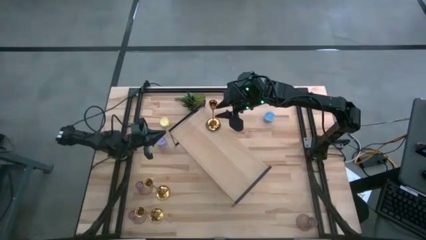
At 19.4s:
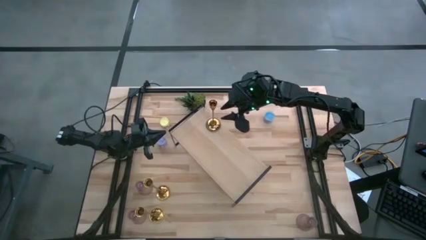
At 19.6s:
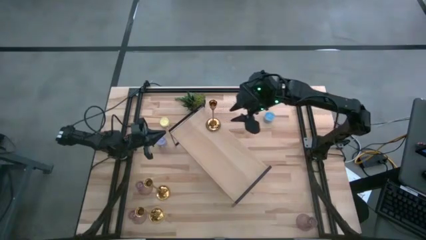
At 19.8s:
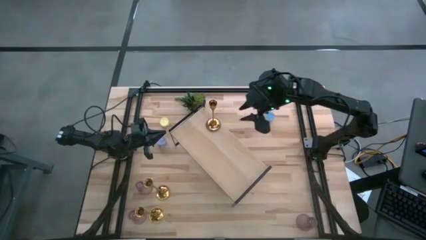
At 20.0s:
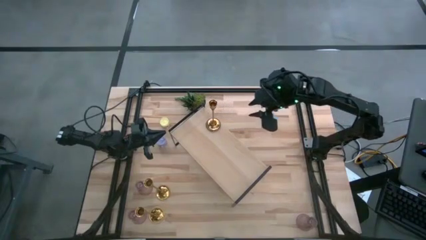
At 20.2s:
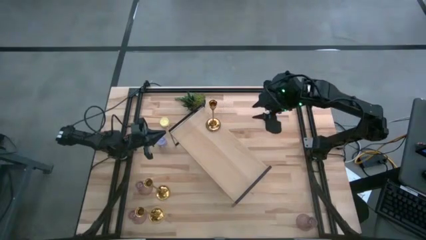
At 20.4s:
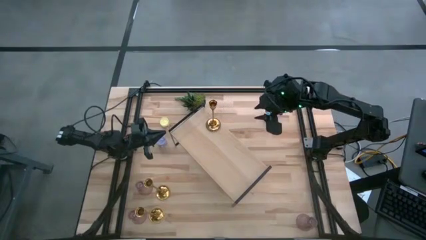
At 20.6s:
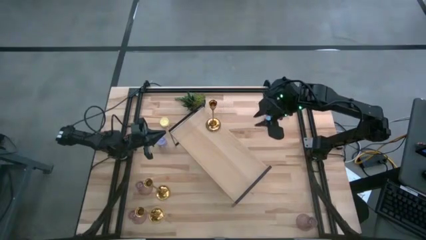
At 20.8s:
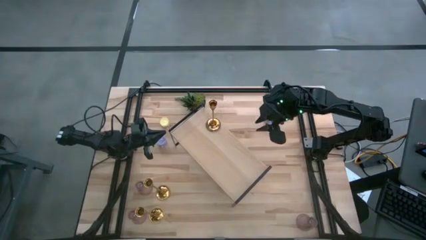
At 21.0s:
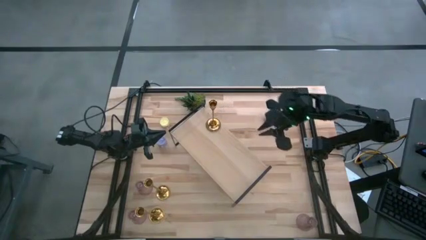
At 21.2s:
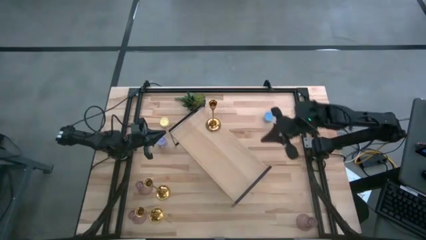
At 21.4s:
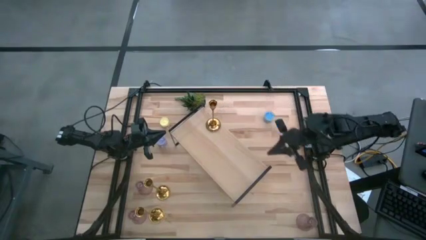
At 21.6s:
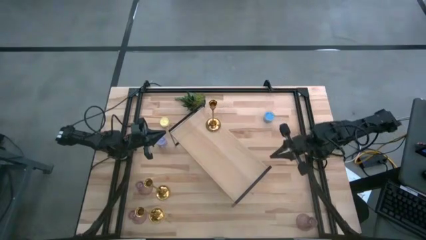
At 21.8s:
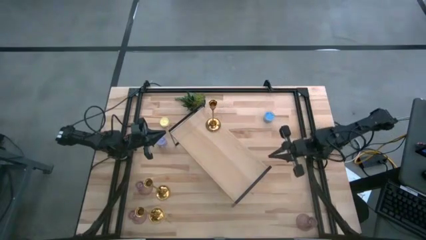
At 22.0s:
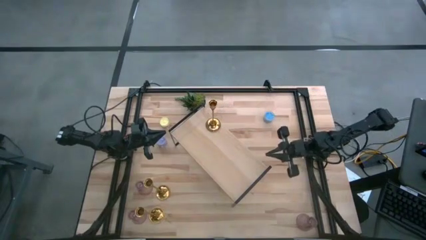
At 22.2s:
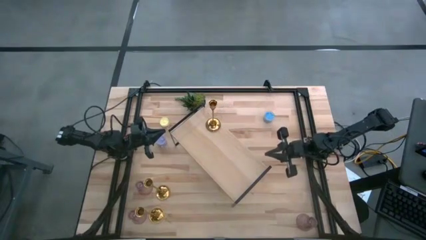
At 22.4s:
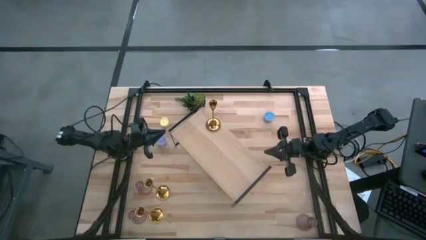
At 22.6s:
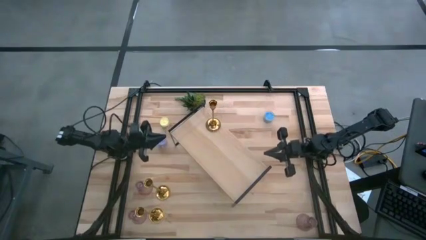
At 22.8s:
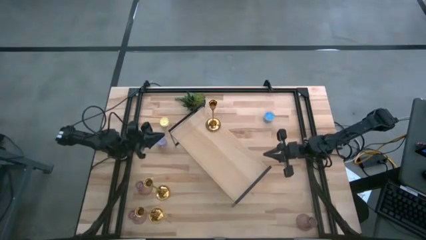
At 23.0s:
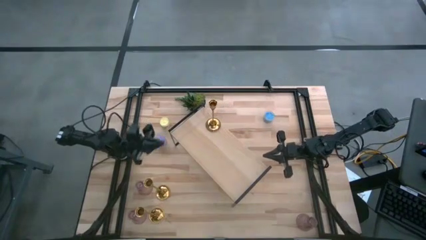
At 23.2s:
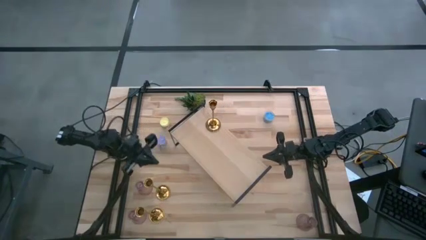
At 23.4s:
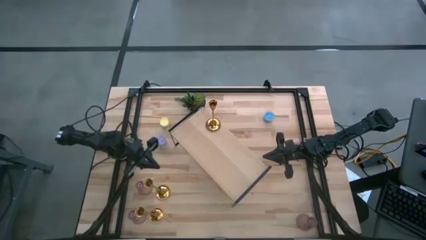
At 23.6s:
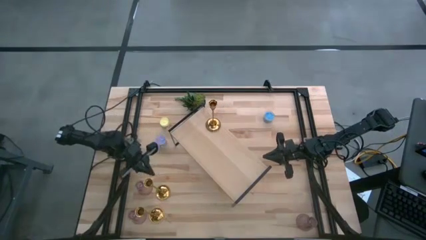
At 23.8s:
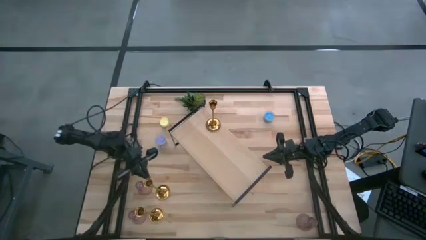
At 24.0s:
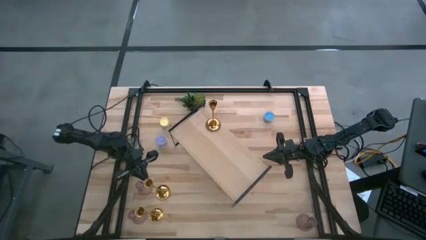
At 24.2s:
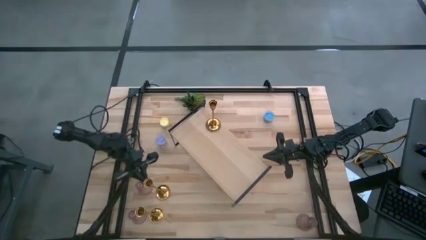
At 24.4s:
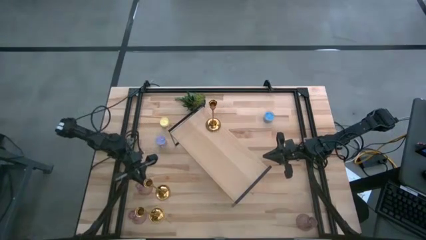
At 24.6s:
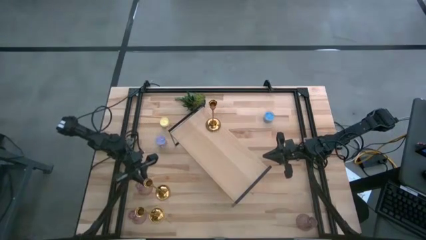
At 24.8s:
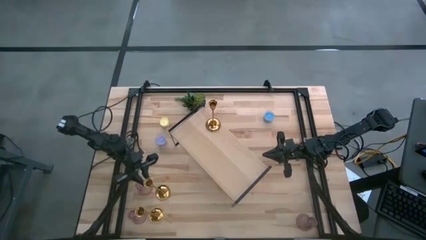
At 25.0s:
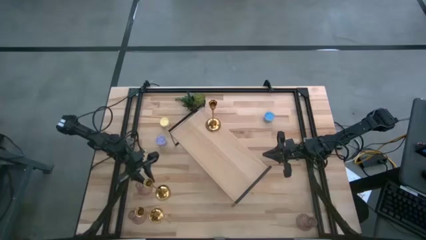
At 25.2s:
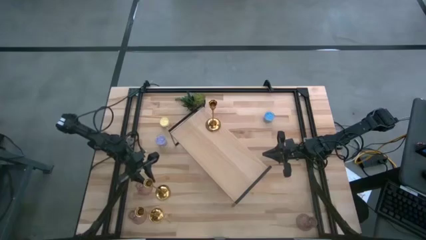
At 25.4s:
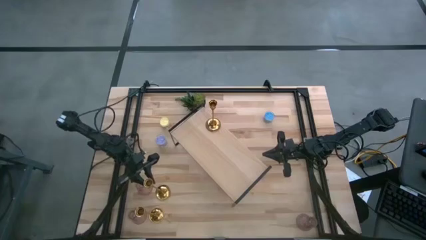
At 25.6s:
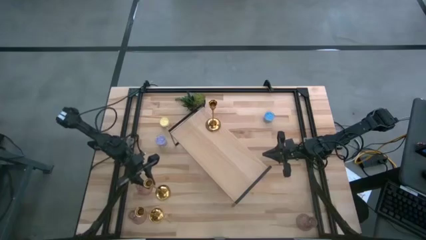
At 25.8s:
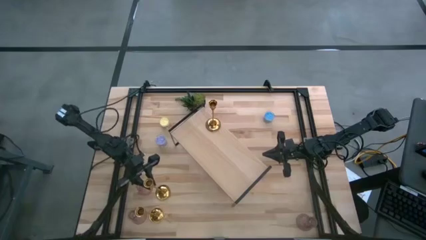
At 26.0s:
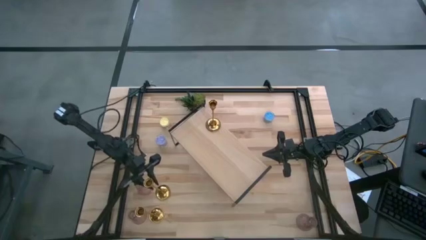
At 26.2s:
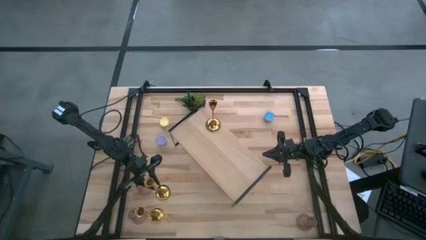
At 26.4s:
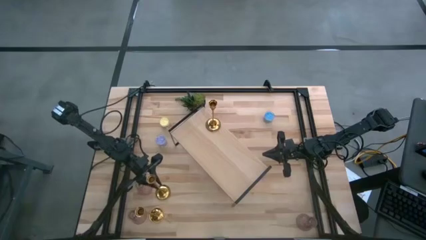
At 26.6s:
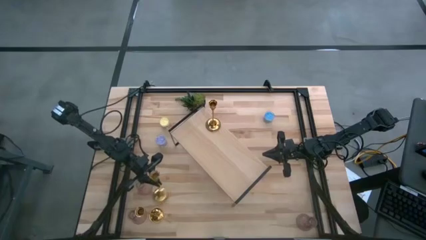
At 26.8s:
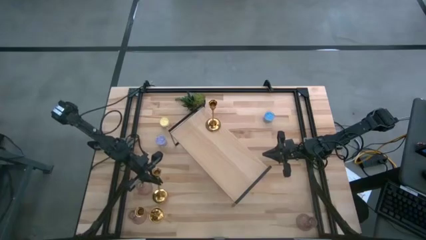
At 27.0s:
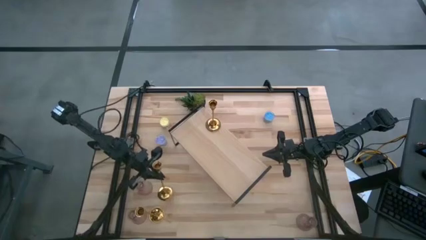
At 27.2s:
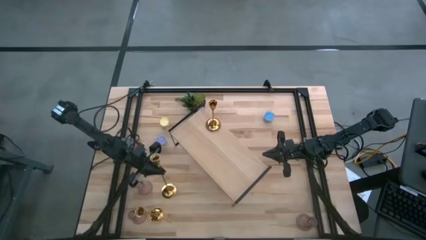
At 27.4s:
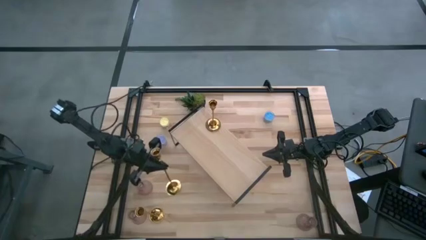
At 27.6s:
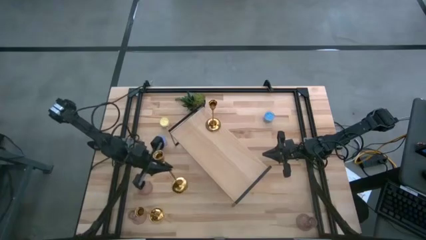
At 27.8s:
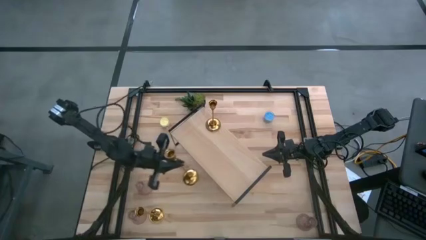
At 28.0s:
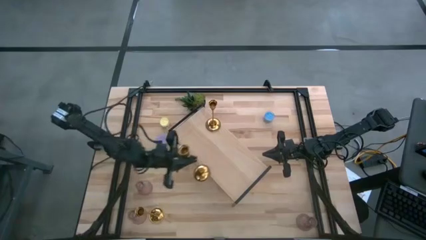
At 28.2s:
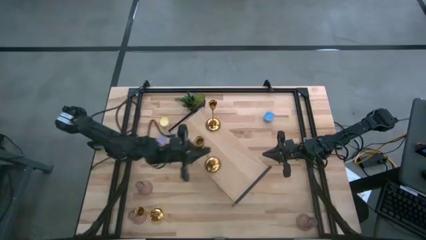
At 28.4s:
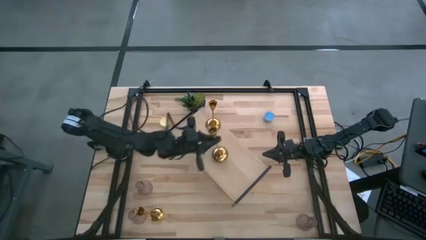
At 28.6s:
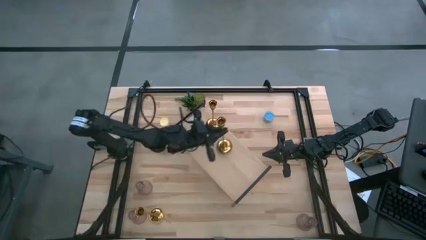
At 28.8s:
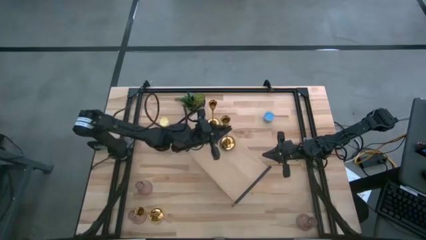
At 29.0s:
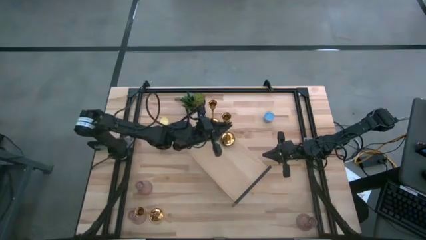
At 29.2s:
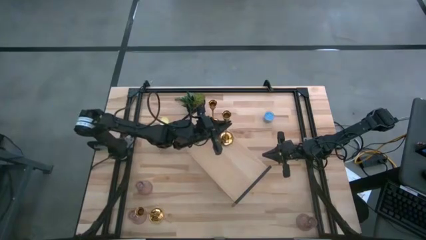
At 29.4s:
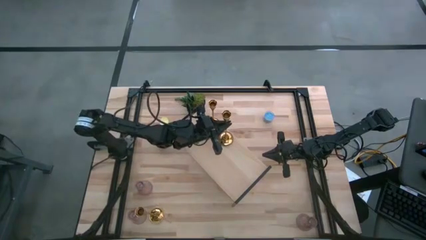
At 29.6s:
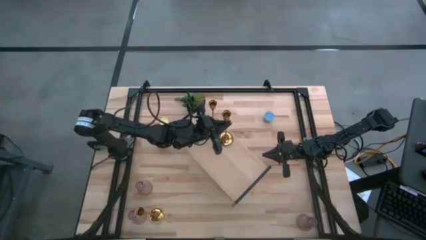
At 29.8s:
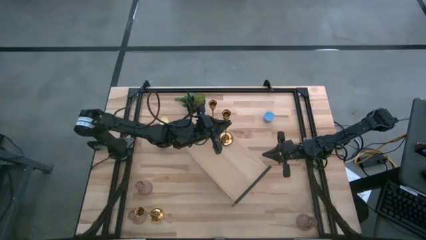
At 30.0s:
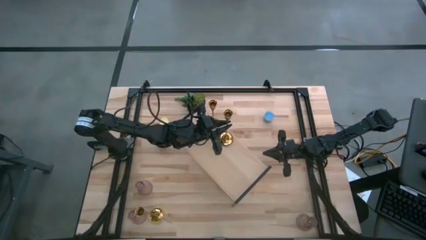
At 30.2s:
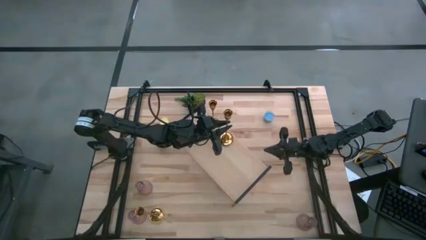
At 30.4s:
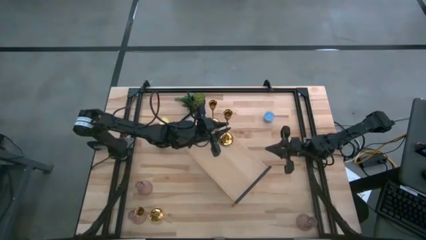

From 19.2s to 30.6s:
Task: Pick & Place candle stick holders
Put the top gold candle holder on the shelf aligned with the other gold candle holder

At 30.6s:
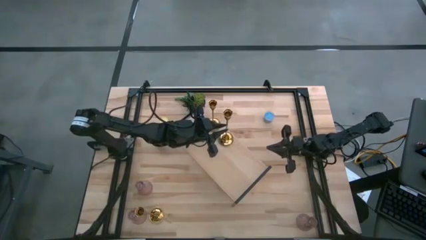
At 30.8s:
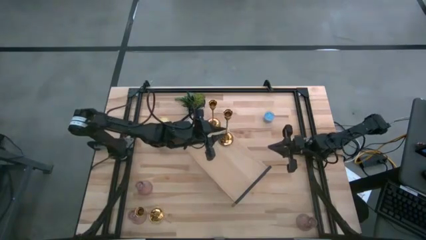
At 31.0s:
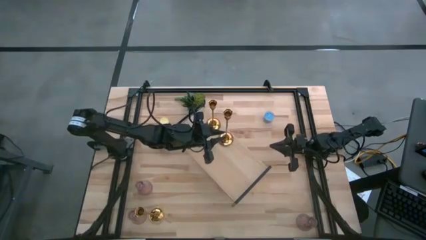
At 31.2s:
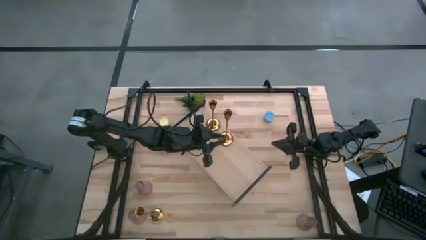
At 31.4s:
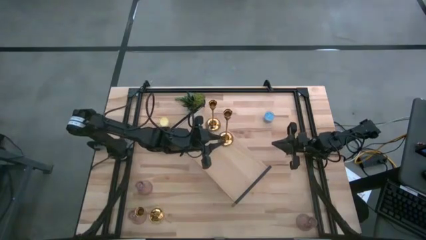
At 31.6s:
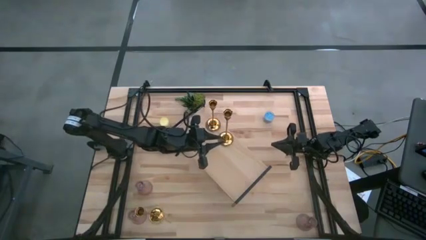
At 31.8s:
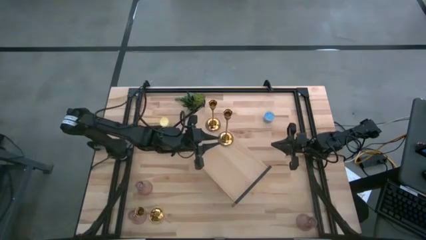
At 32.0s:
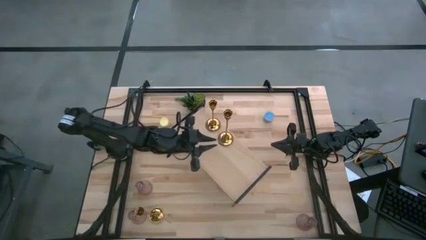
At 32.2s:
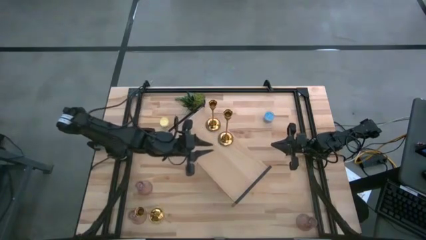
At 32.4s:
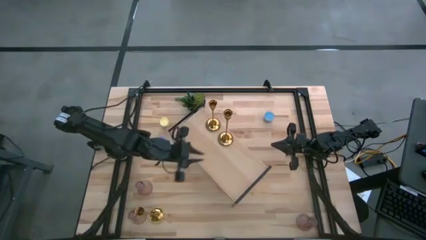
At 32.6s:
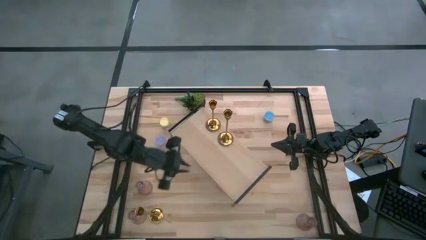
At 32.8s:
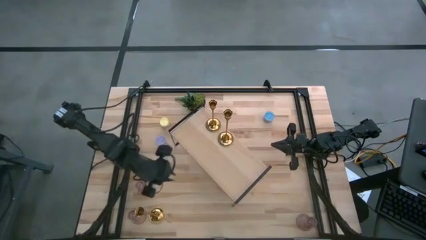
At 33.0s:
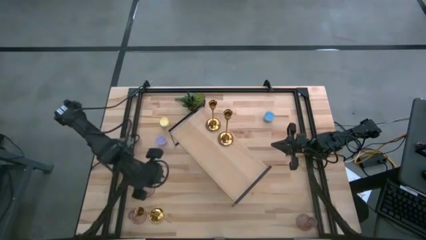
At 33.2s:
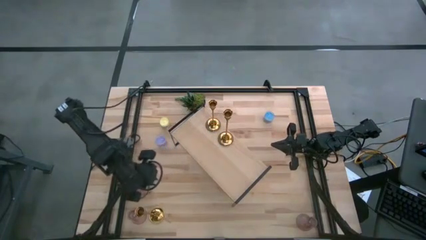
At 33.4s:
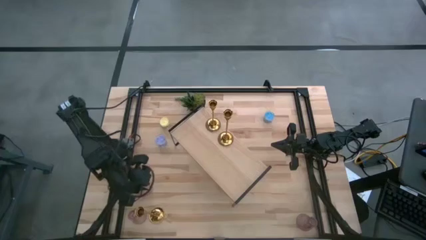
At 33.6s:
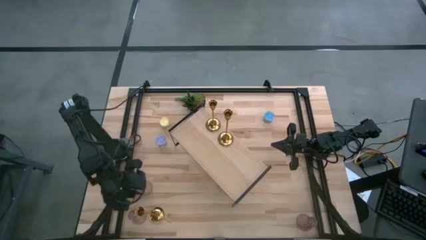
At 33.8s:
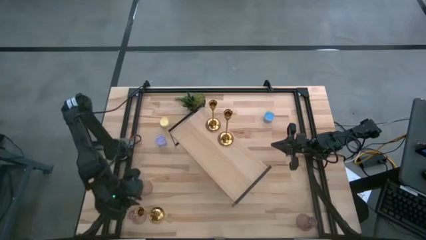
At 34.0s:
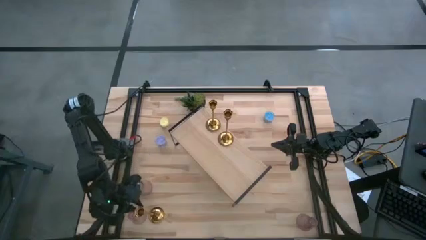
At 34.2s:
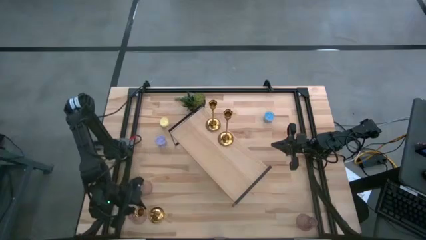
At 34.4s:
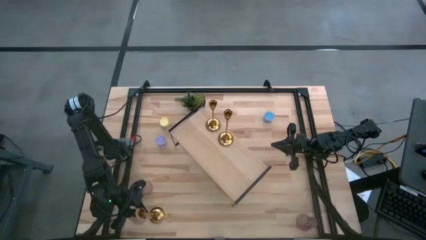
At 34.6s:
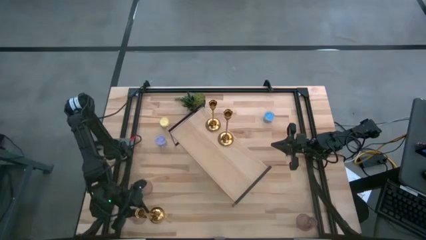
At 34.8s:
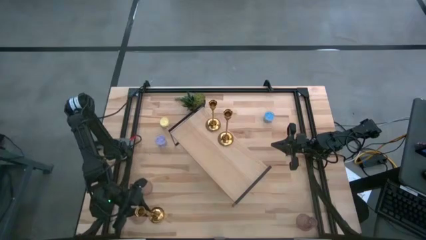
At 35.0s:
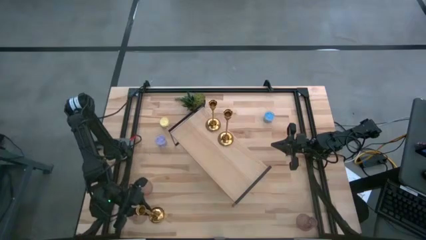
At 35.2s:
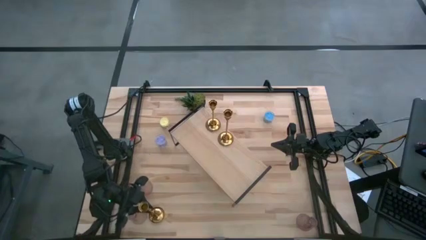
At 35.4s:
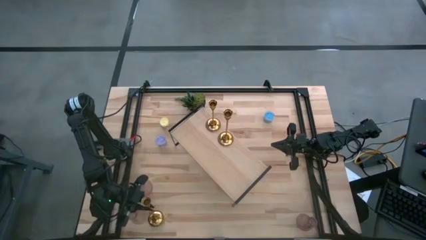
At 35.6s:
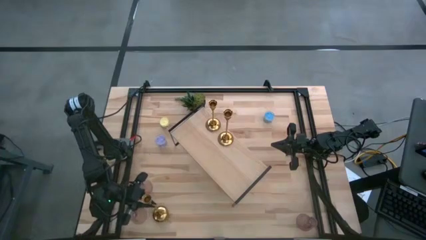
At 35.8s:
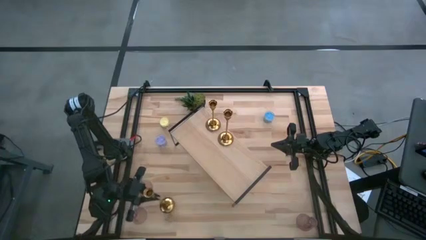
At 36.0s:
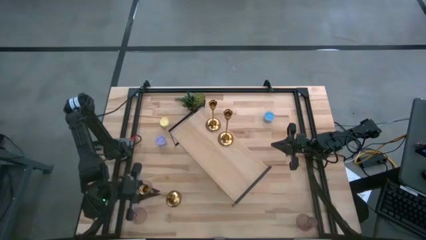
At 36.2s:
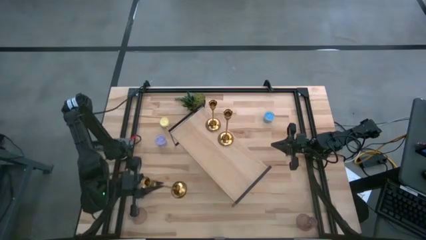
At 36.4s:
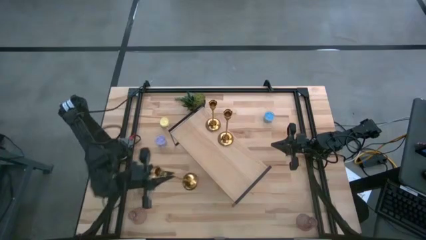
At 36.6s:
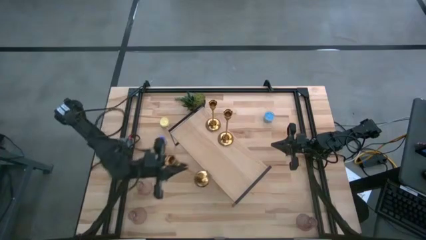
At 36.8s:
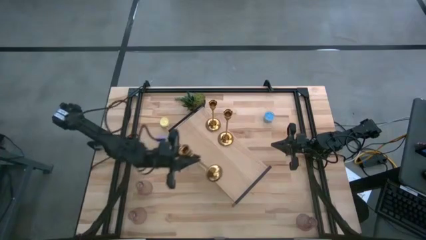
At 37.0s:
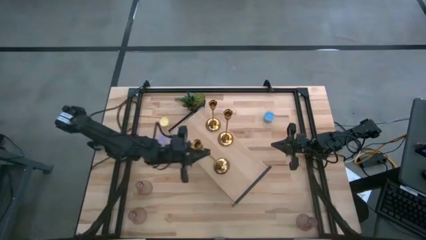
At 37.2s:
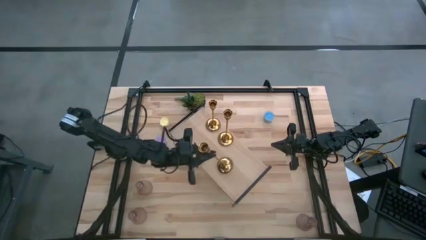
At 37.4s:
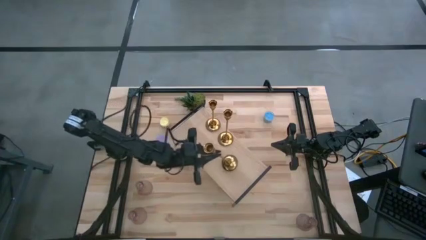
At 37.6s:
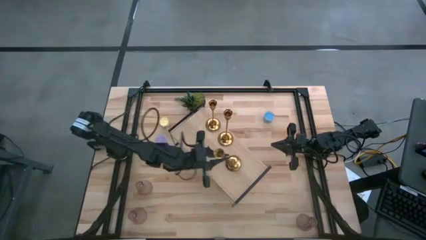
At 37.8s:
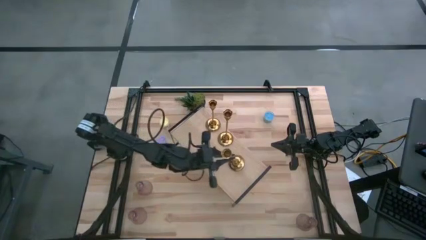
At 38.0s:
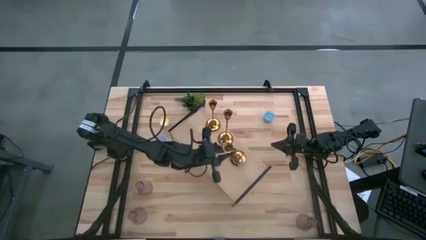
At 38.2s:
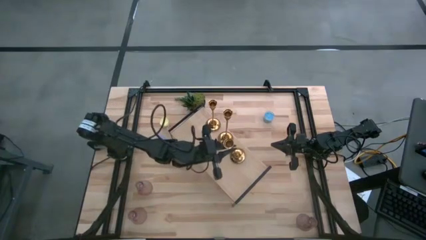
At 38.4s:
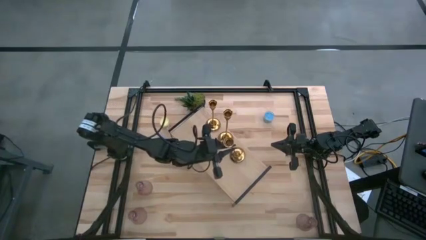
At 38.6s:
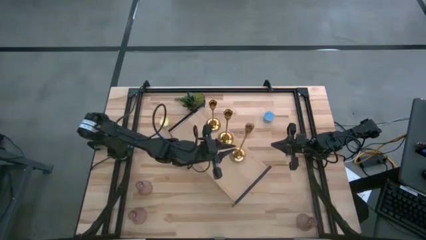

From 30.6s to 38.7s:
Put the gold candle holder on the shelf aligned with the other gold candle holders
